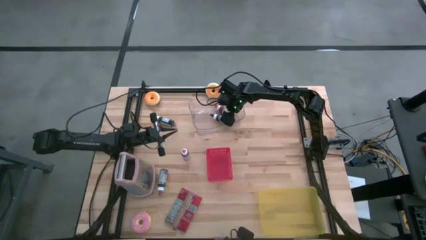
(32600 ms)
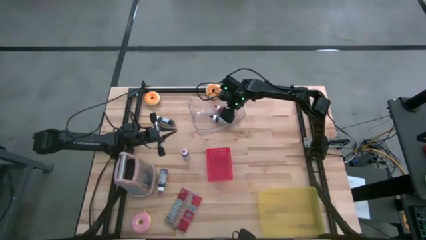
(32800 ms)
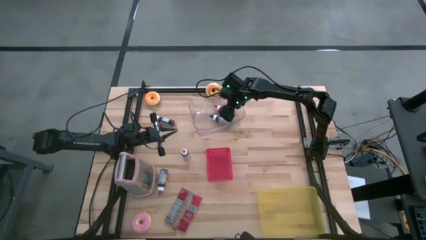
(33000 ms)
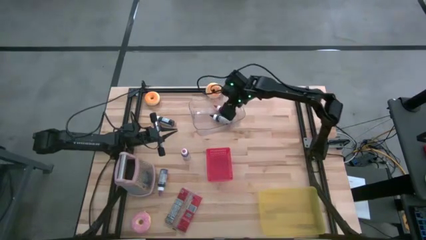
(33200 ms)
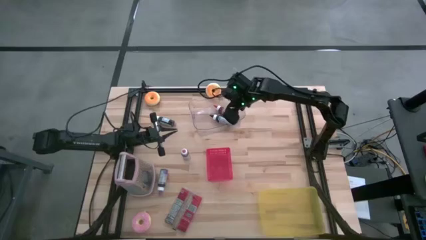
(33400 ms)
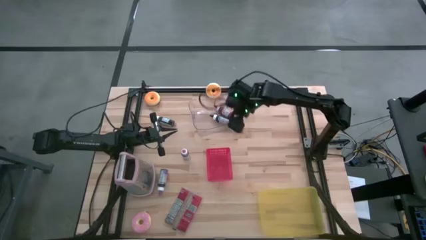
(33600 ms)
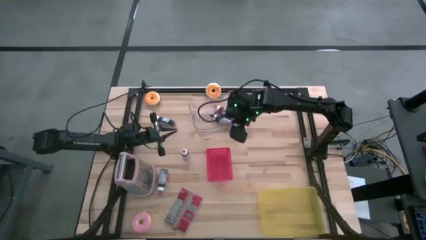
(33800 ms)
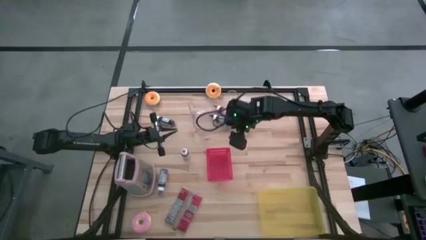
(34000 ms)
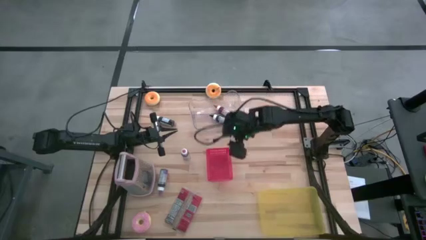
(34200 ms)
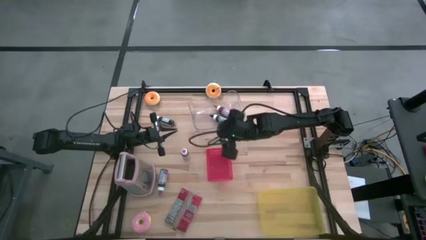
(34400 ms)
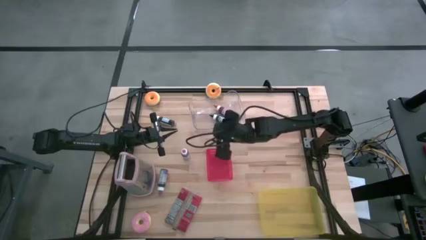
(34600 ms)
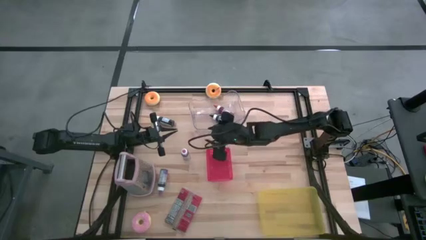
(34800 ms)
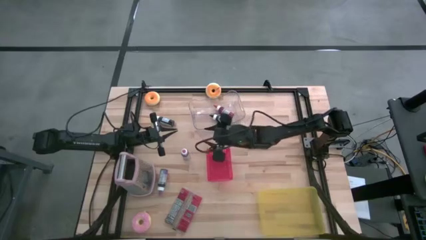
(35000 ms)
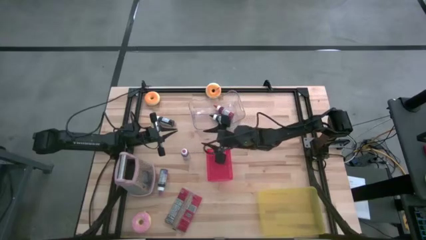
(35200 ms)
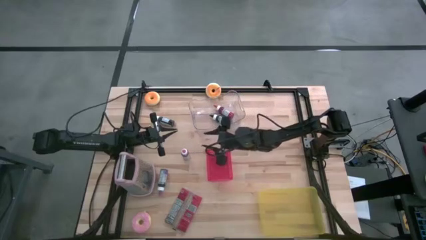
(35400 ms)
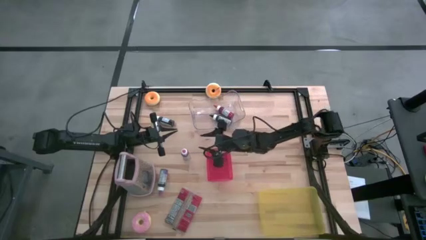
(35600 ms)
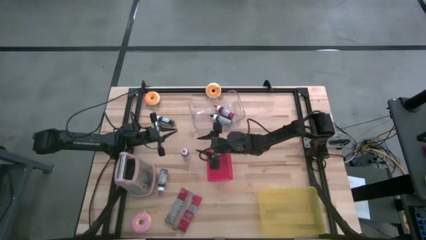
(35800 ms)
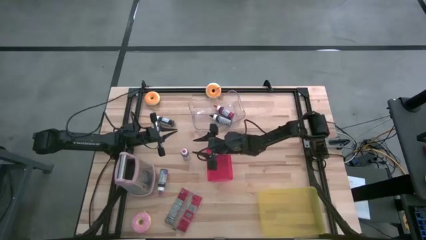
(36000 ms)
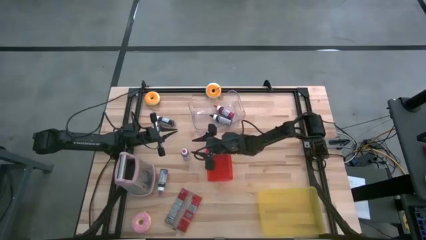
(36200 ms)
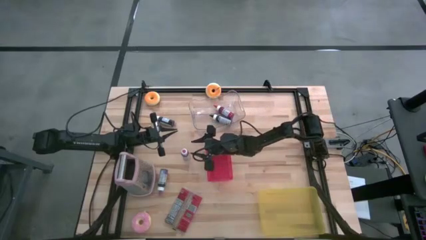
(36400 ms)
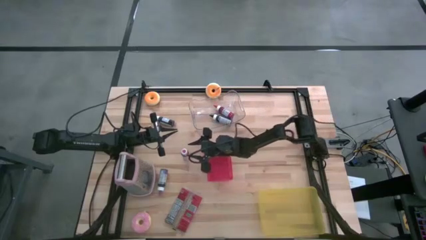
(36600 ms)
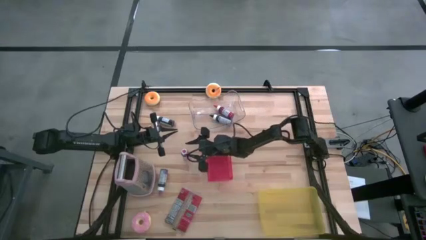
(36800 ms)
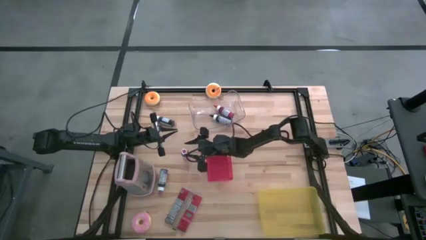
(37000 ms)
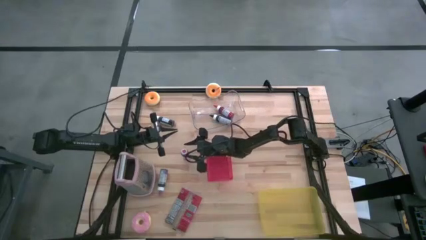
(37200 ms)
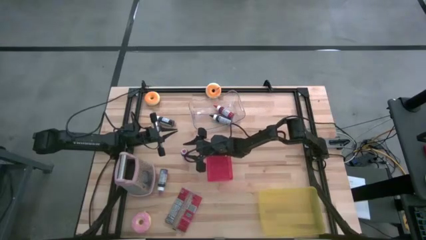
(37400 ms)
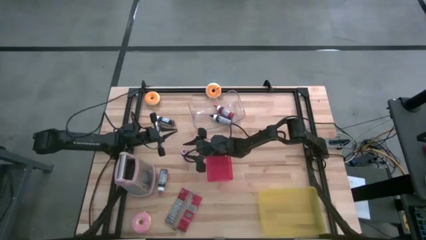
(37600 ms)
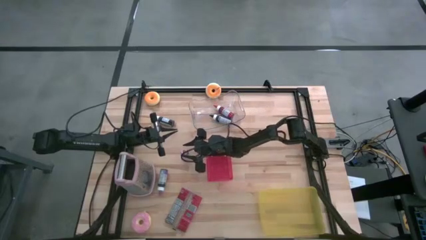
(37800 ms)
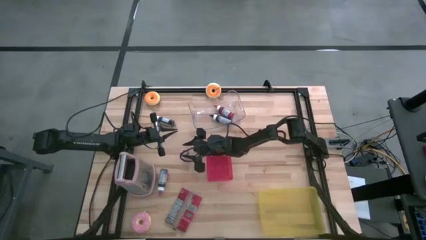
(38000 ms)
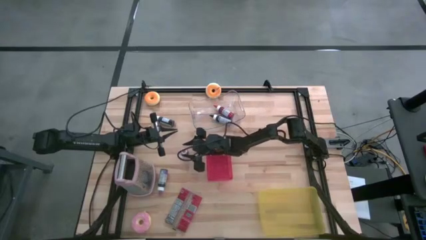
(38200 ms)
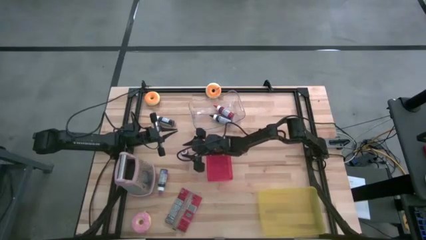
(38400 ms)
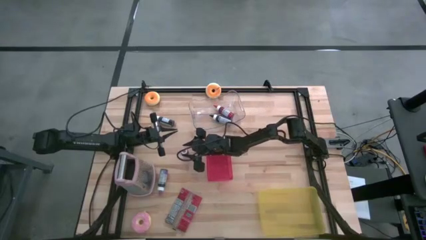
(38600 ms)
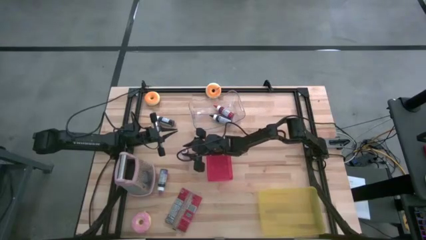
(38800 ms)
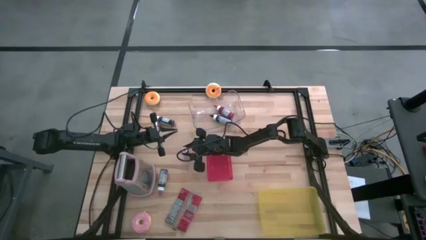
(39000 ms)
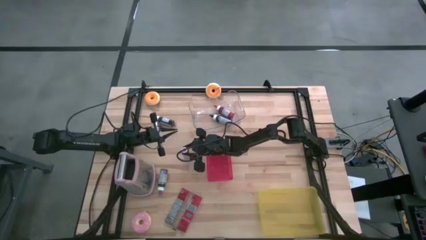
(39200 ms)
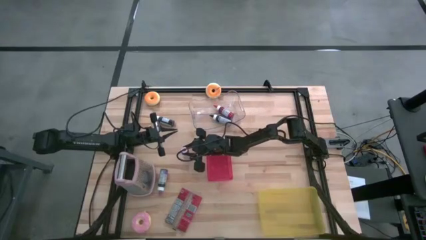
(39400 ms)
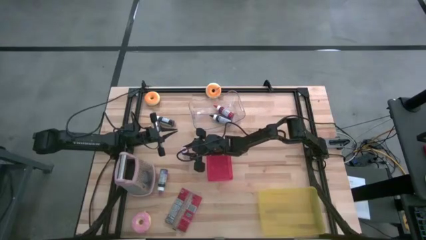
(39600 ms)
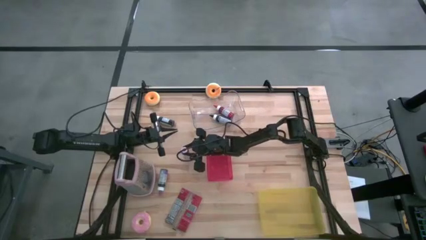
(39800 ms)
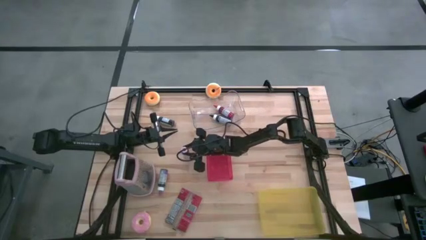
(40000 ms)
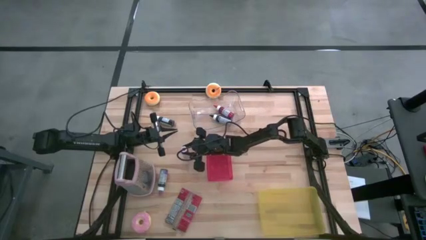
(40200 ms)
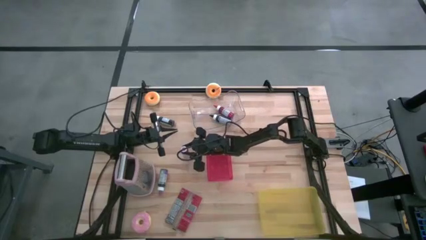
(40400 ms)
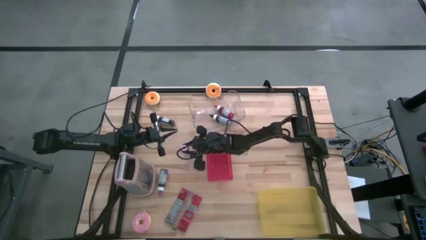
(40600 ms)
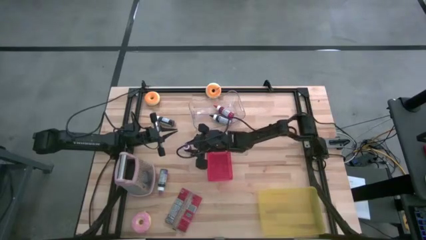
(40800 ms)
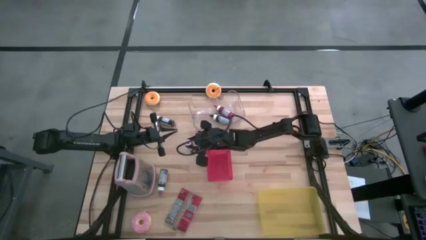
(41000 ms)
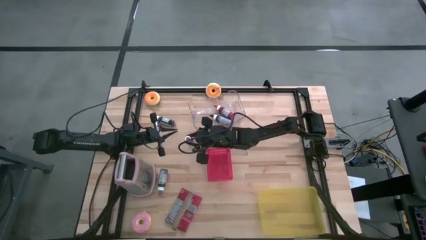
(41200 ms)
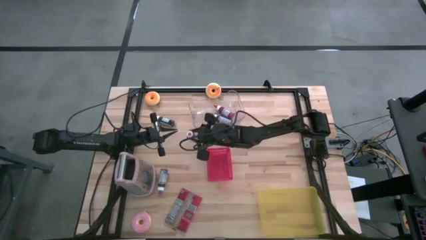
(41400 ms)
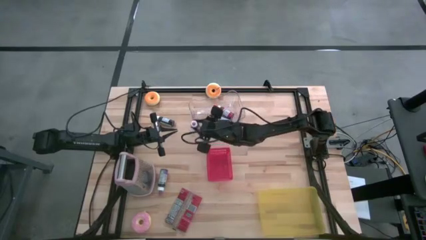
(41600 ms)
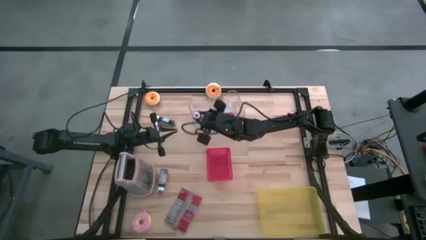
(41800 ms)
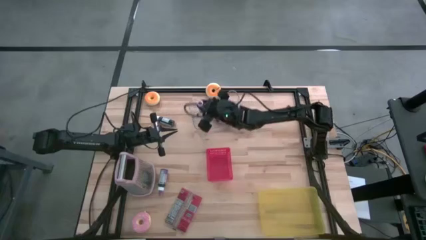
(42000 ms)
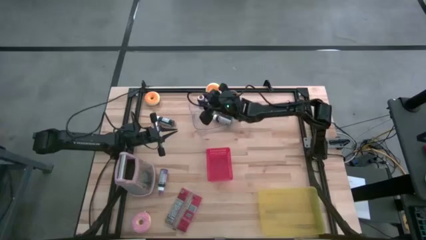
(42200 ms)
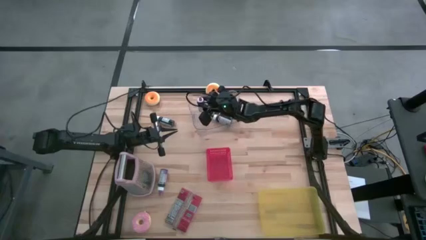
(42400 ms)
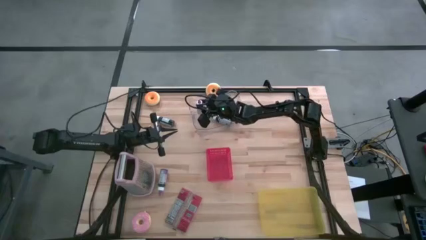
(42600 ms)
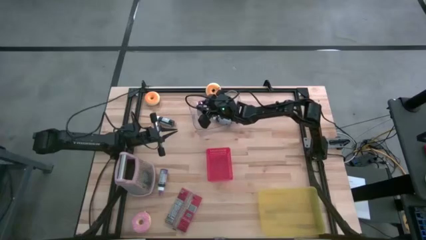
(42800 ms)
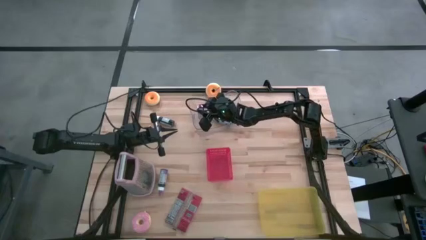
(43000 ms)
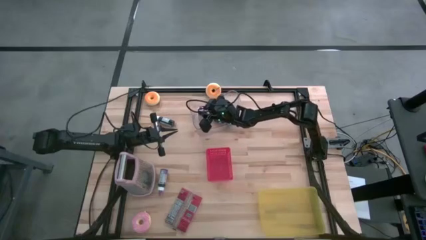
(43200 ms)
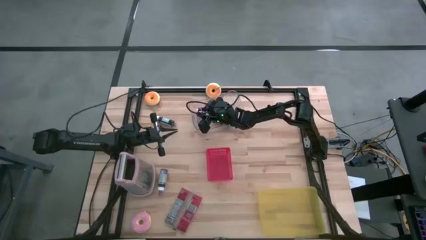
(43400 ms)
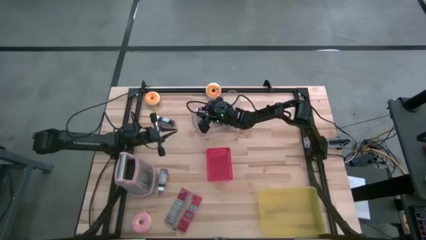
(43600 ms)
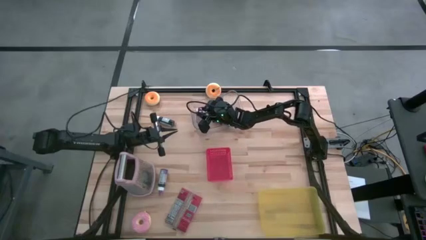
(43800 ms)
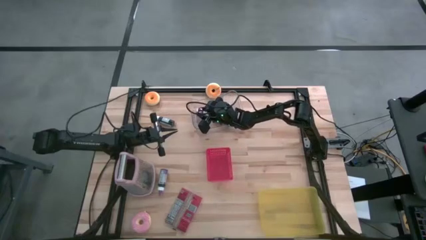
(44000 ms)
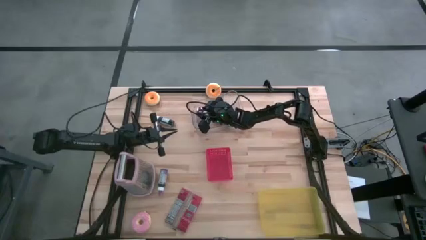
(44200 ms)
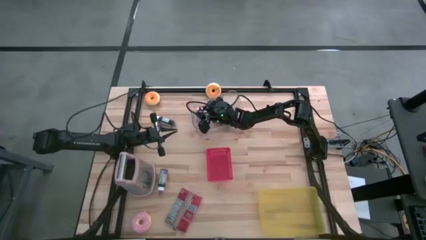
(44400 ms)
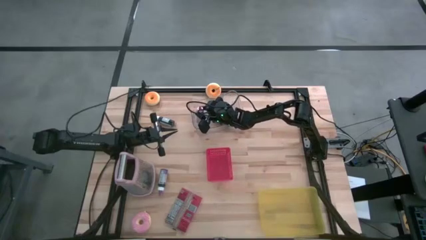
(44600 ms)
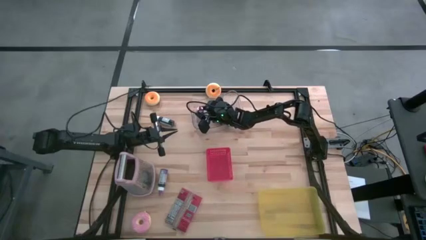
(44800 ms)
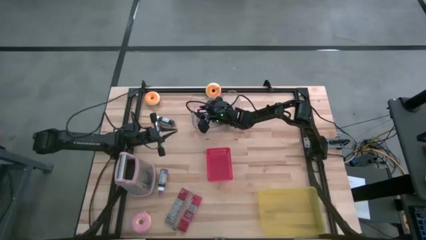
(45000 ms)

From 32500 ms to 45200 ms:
Task: Pick & Place Food Item
Put the pink food coloring bottle into the transparent bin
